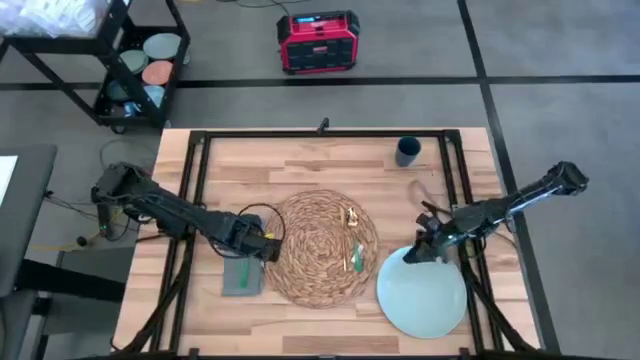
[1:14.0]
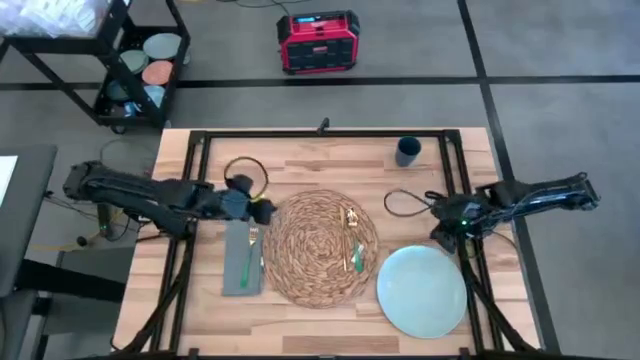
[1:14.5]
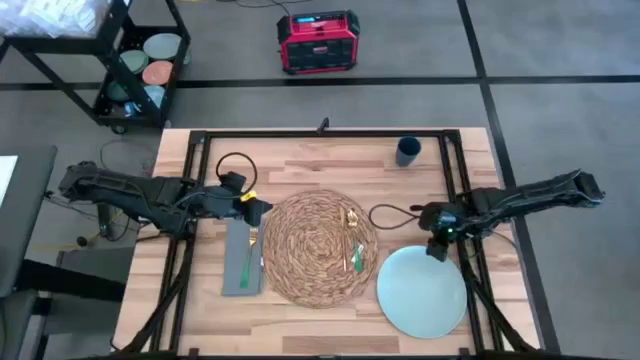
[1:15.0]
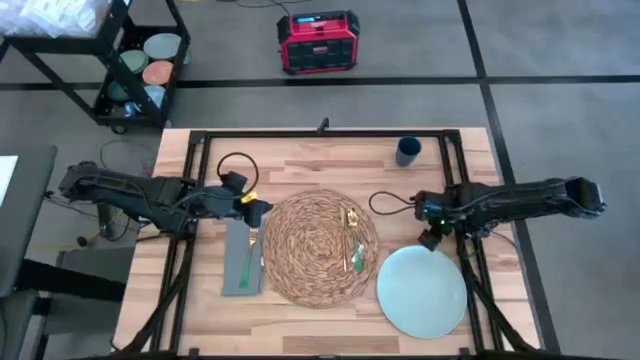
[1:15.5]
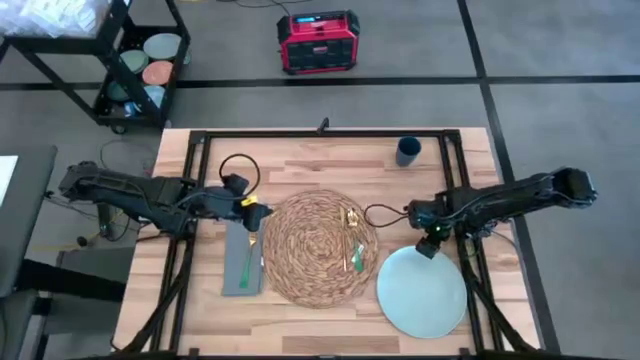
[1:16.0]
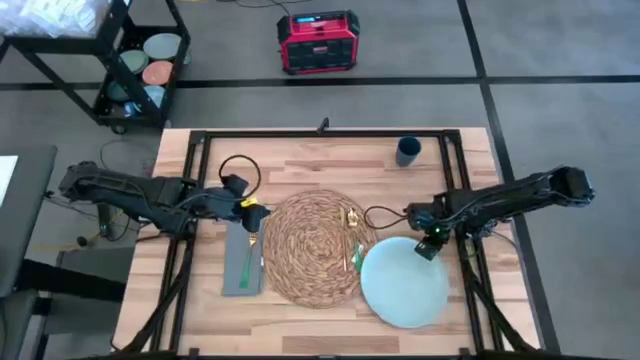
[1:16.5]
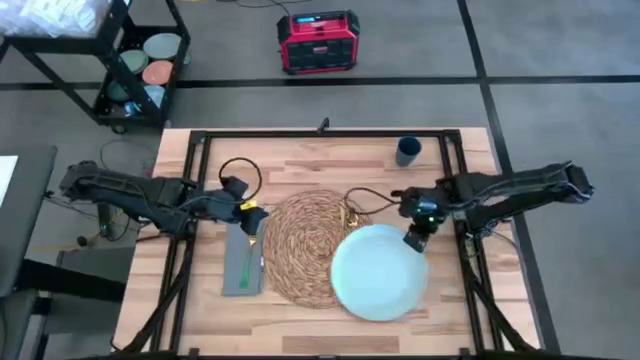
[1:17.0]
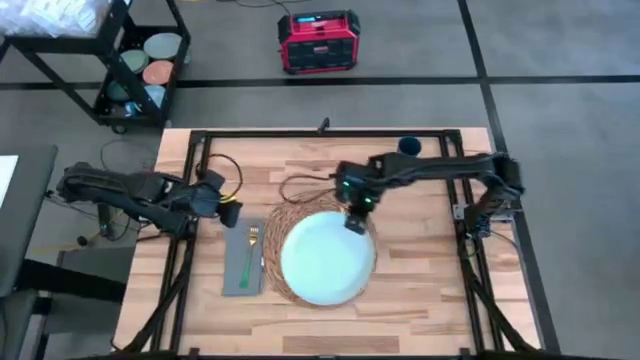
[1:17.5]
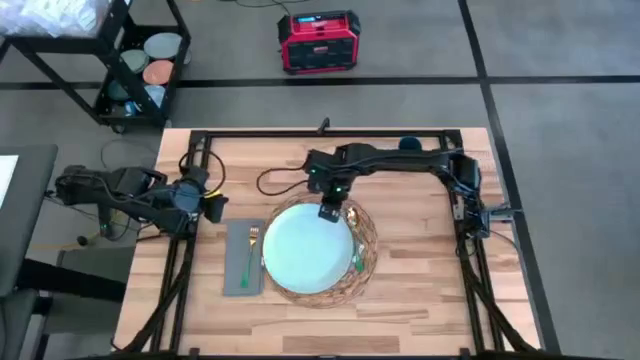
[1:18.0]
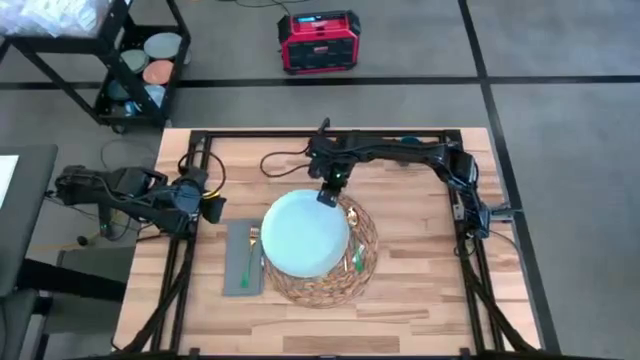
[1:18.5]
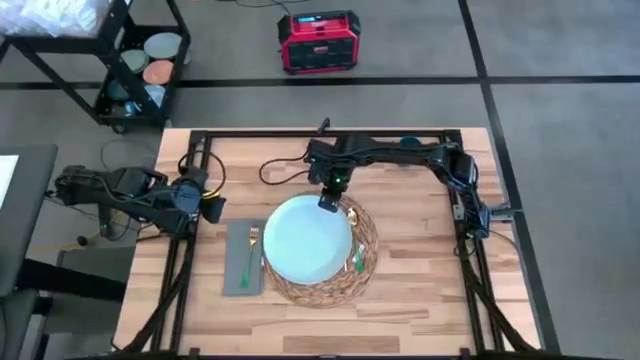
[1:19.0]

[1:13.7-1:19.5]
Task: Set table place
Put the white plate to the left of the gold table knife on the brown table mat

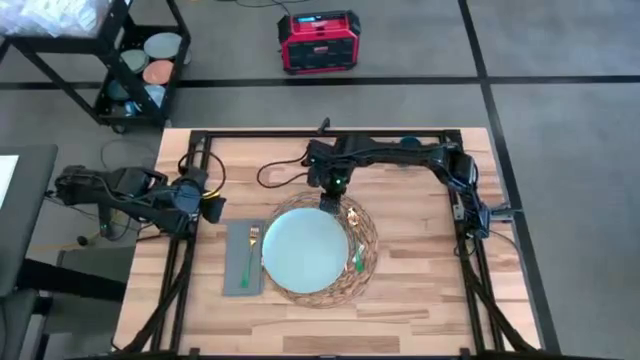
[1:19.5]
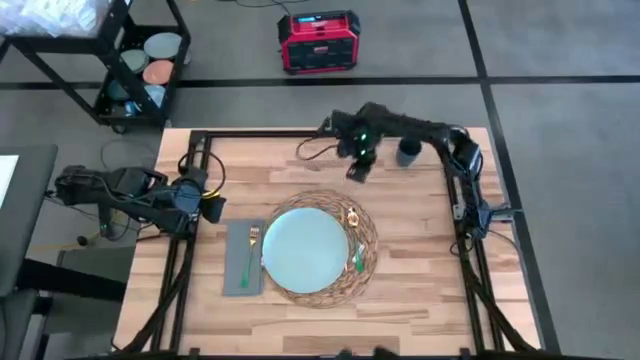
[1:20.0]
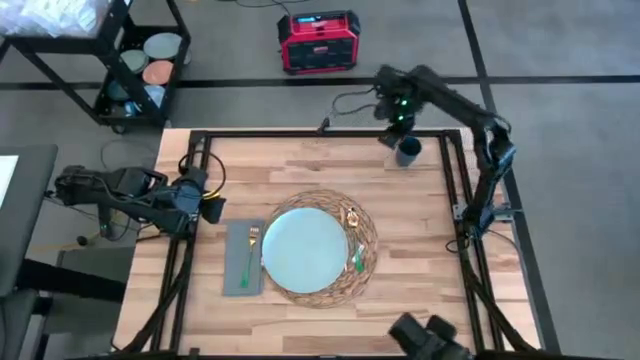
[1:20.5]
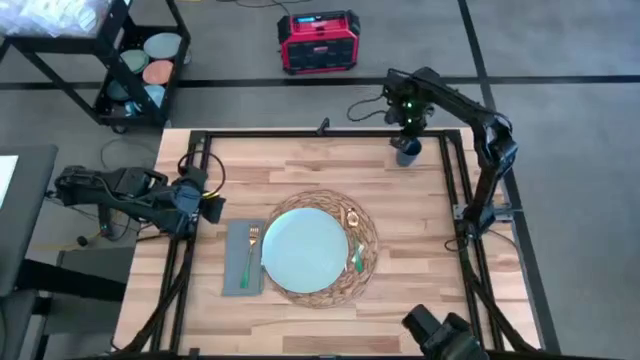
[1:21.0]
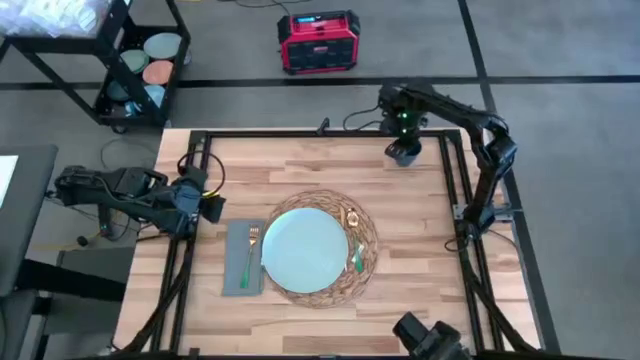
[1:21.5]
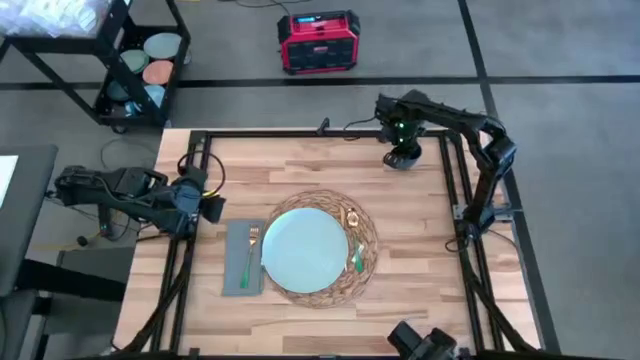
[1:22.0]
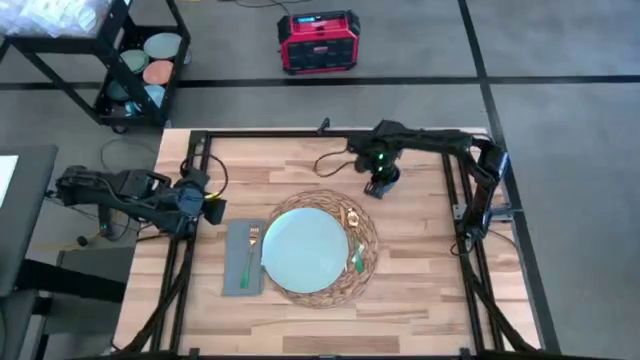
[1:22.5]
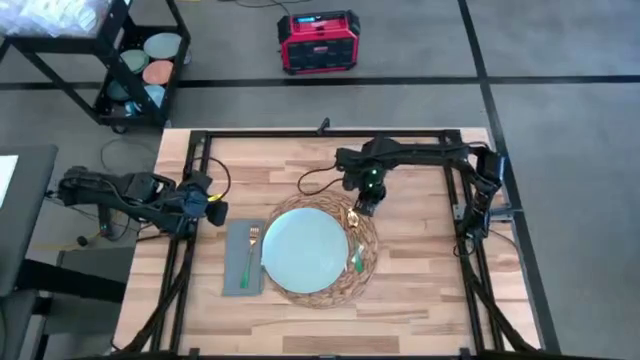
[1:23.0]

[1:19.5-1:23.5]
Move the blue cup to the top right of the brown table mat on the table

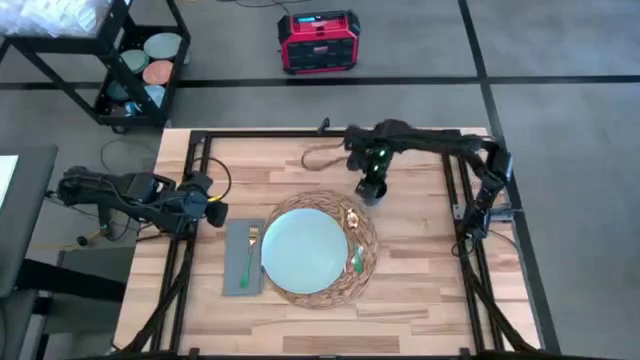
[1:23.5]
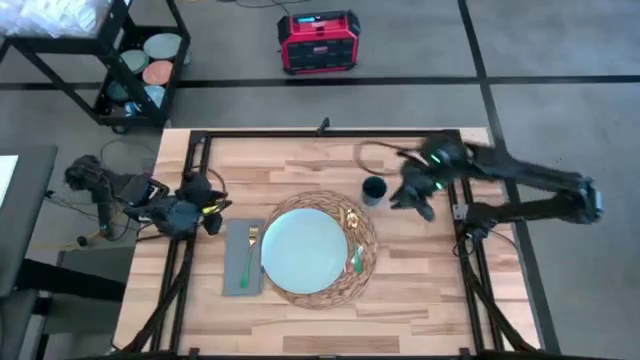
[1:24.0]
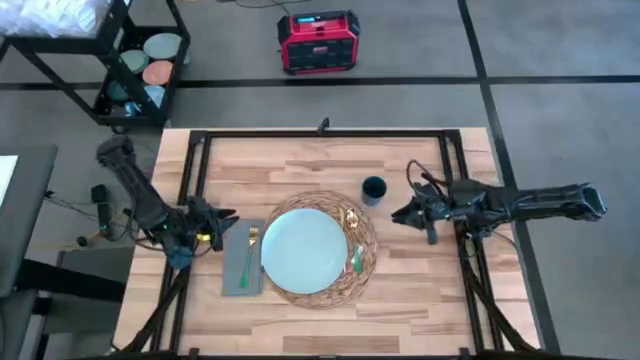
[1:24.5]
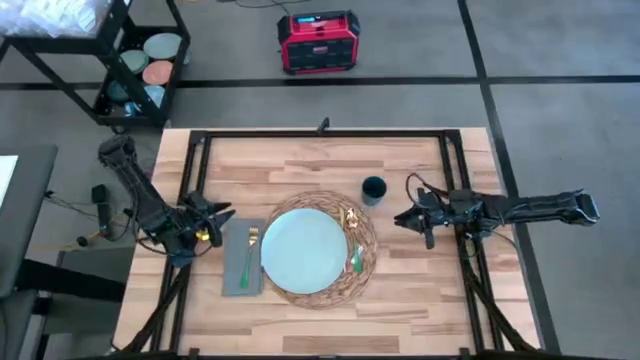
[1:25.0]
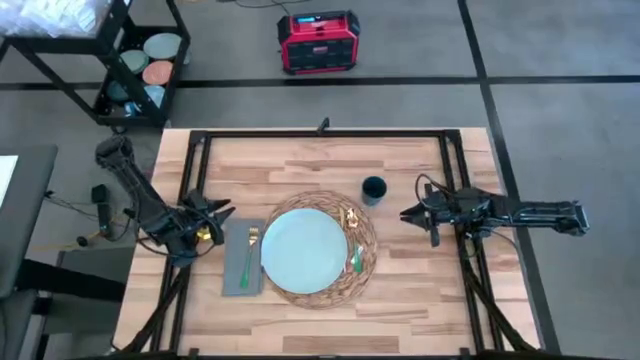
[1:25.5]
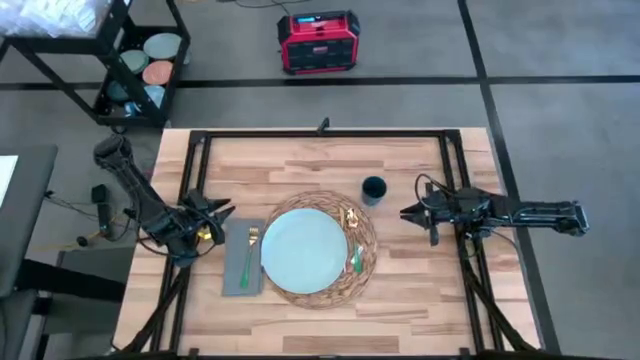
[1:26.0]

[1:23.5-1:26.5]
Return to Home Position

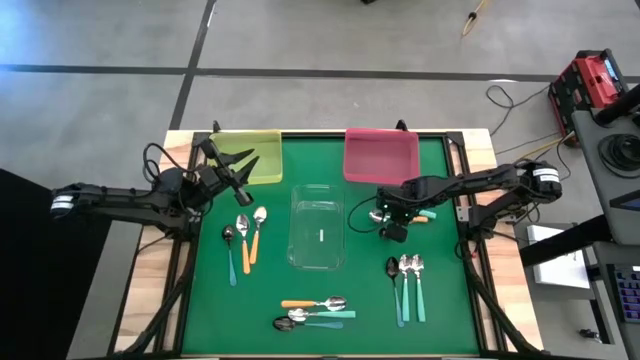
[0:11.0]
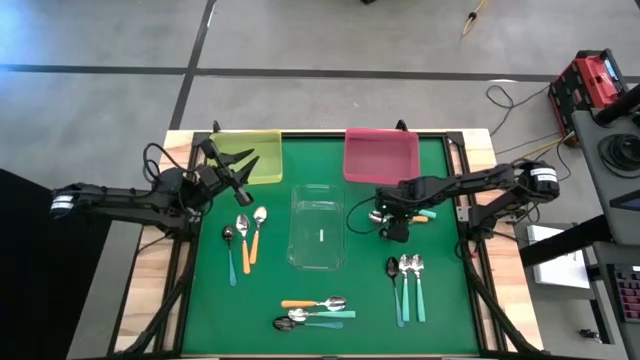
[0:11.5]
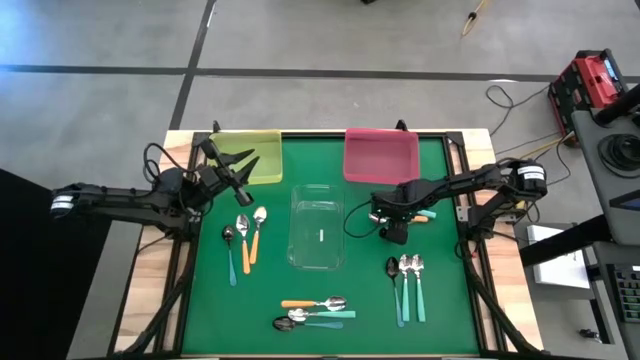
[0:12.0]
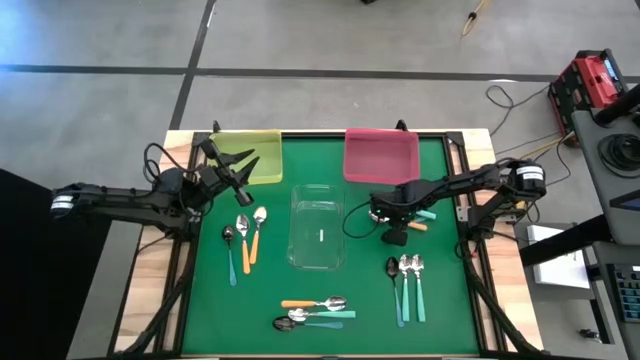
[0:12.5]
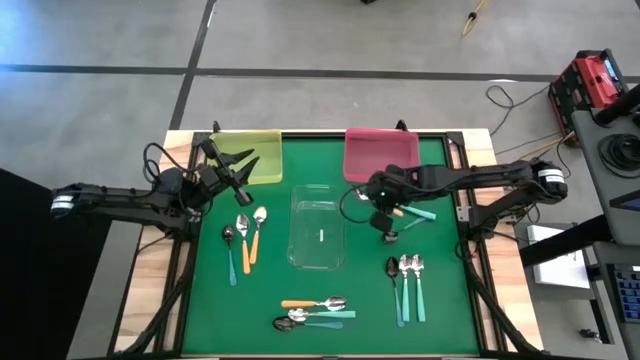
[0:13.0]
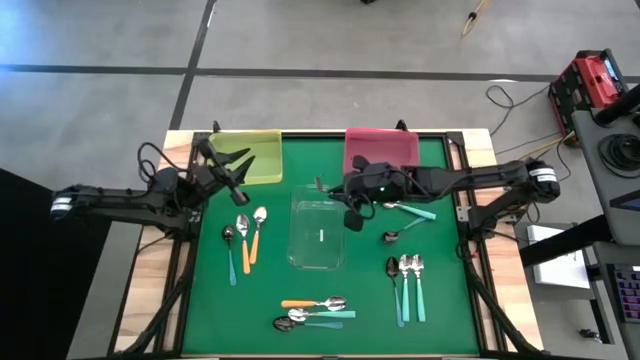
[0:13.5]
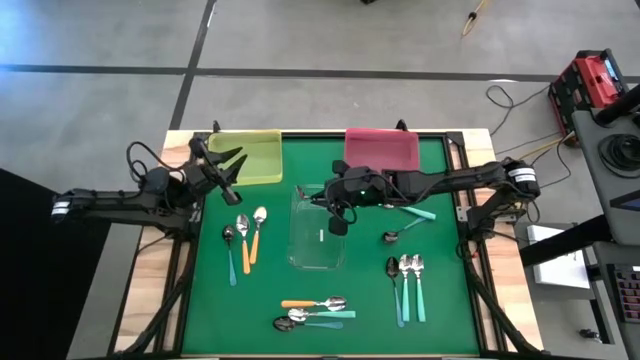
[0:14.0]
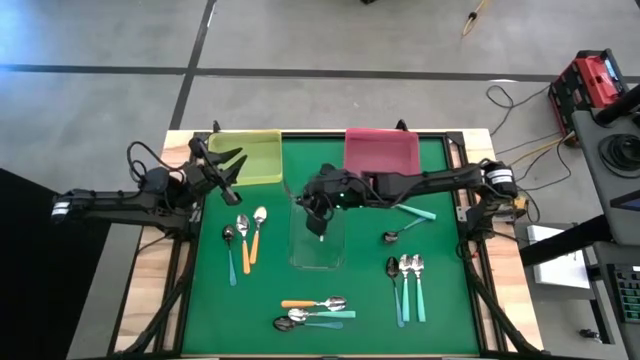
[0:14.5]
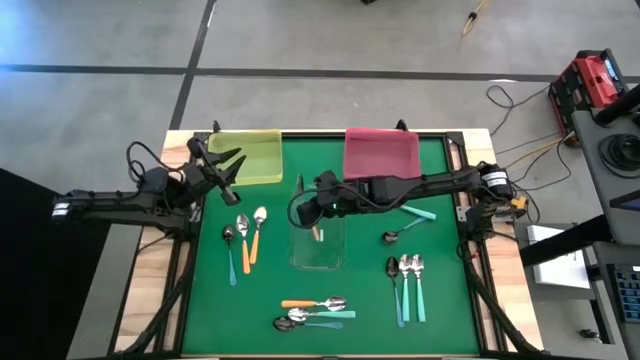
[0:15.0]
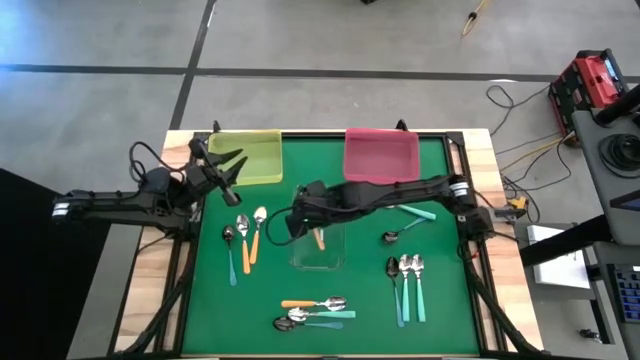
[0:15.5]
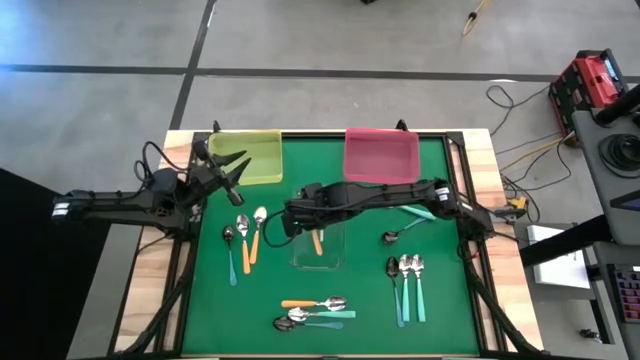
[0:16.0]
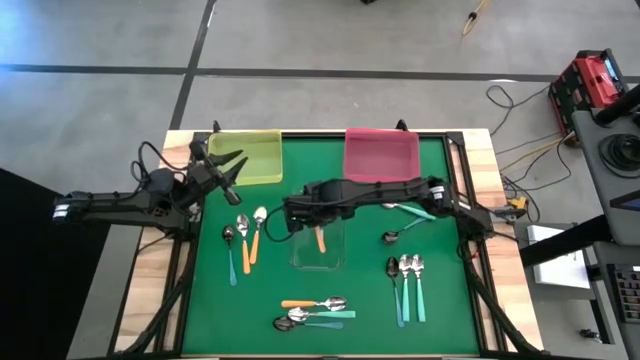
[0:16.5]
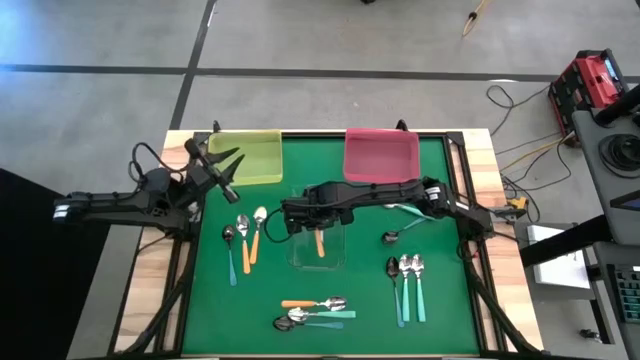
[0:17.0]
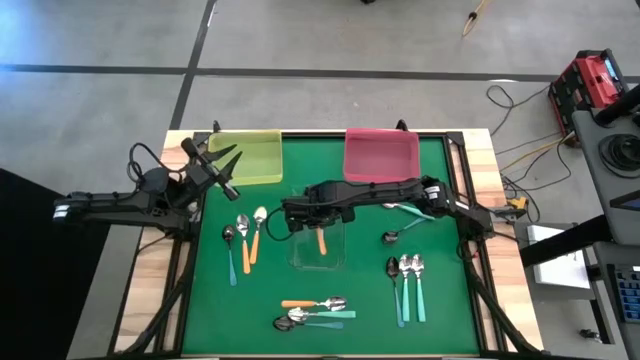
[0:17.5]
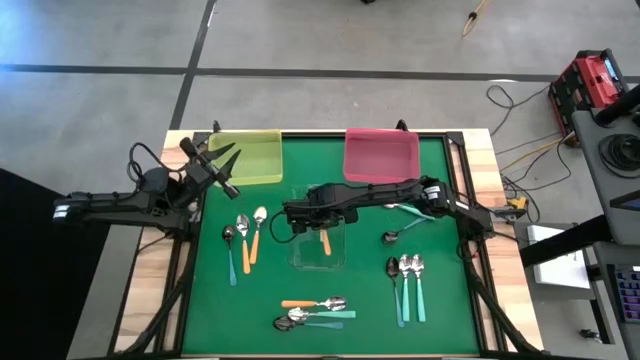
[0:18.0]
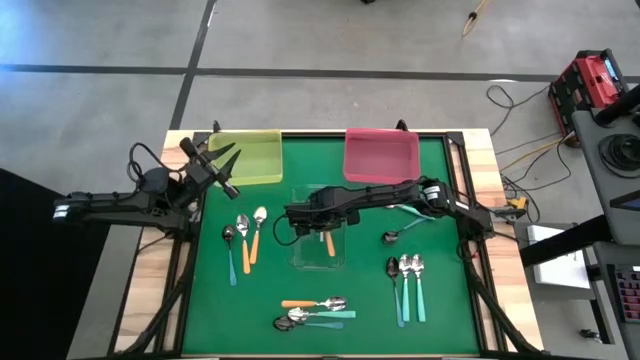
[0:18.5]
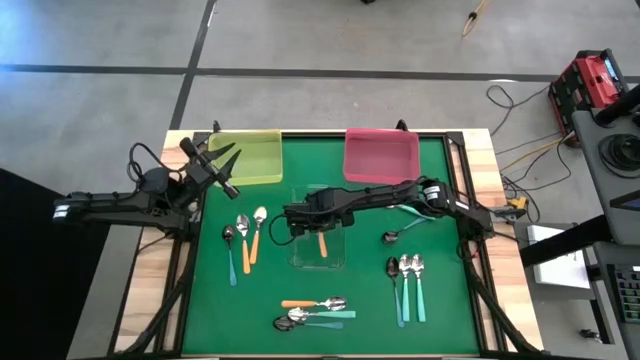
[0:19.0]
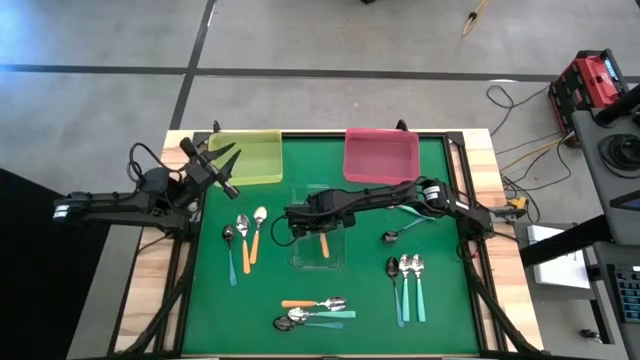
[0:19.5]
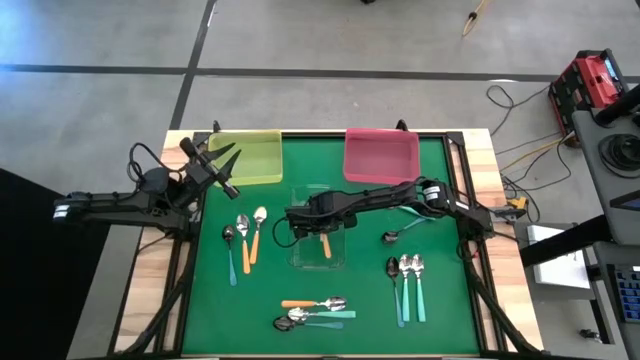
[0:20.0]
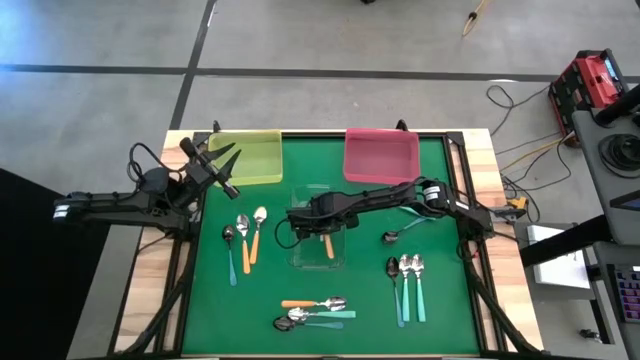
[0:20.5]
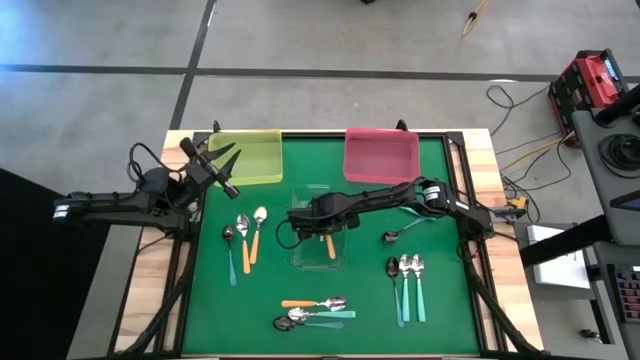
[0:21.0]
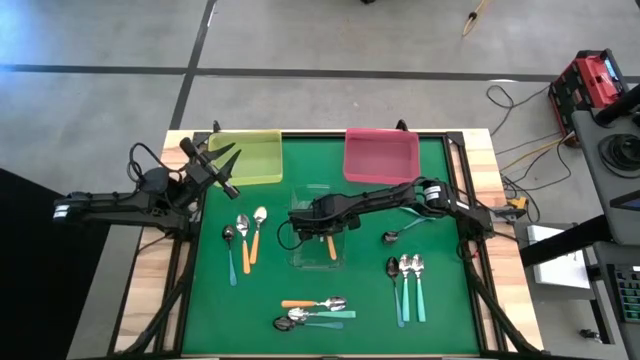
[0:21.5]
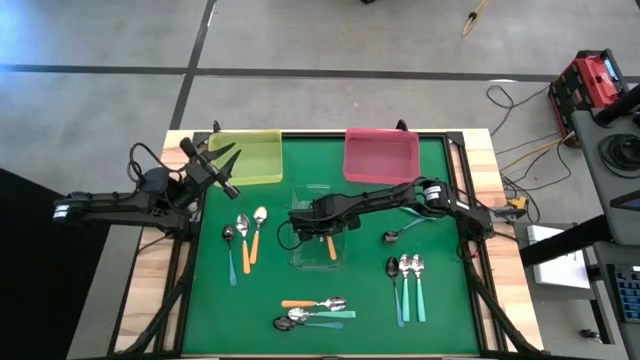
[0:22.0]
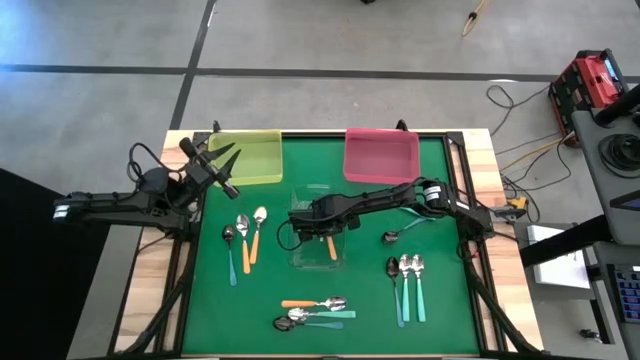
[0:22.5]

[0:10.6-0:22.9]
Task: Sort silverware by color (type)
Put the top right yellow spoon into the transparent bin
